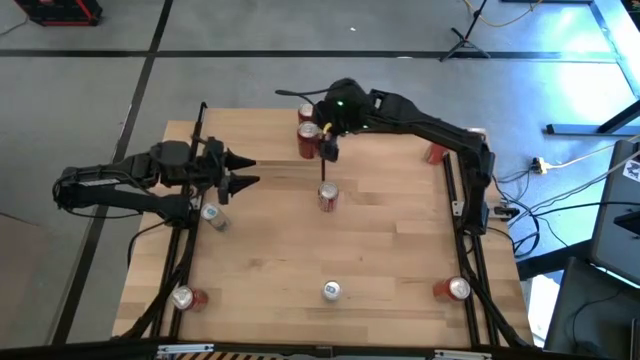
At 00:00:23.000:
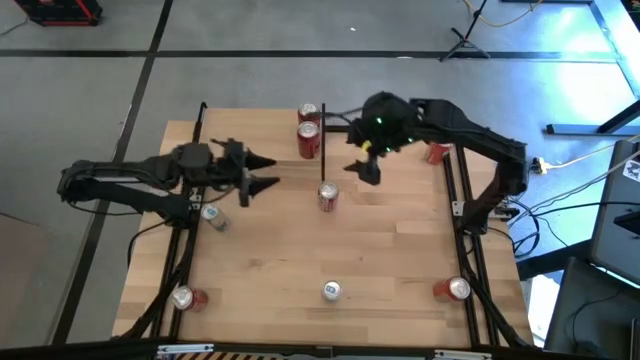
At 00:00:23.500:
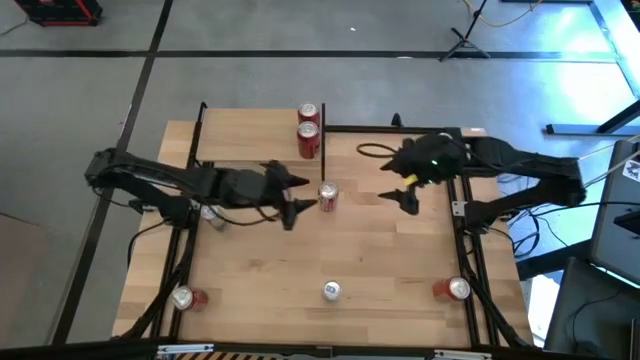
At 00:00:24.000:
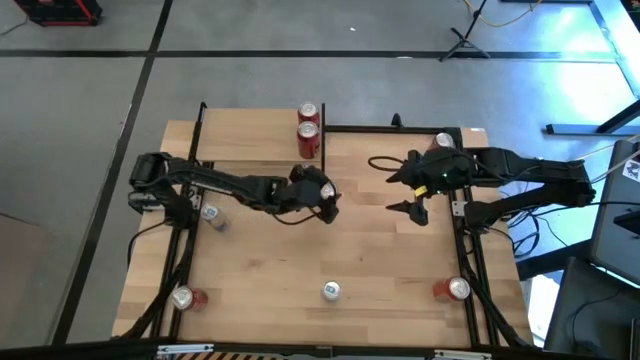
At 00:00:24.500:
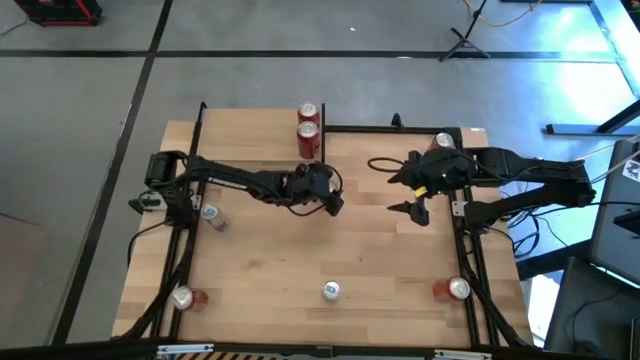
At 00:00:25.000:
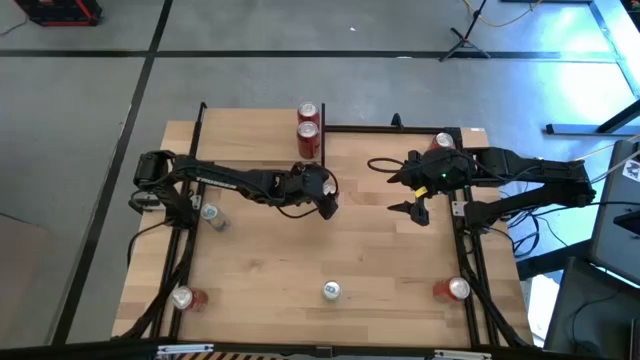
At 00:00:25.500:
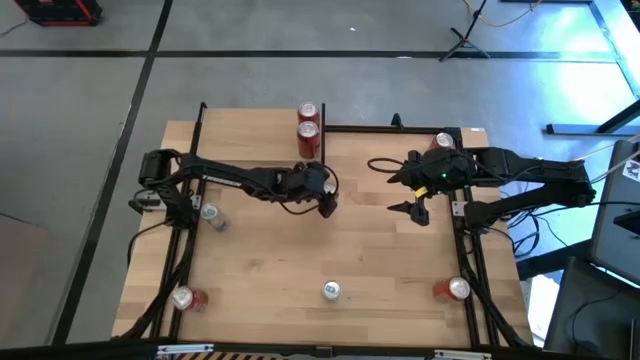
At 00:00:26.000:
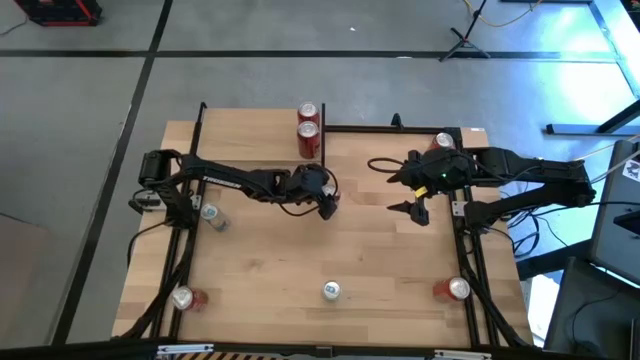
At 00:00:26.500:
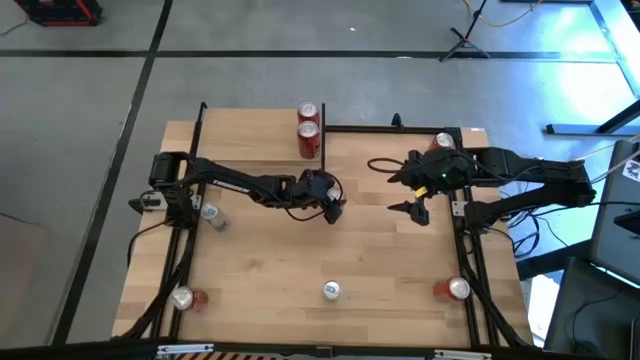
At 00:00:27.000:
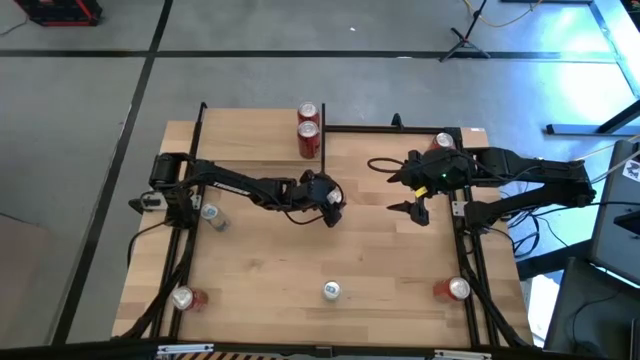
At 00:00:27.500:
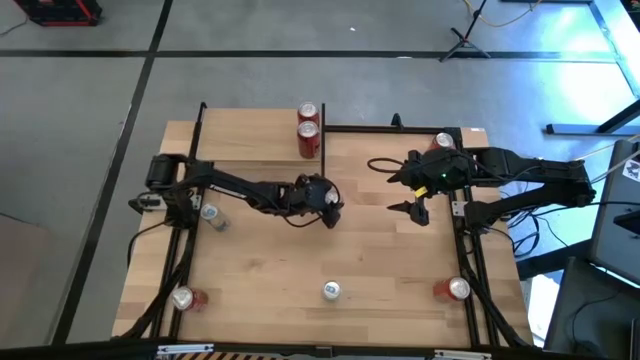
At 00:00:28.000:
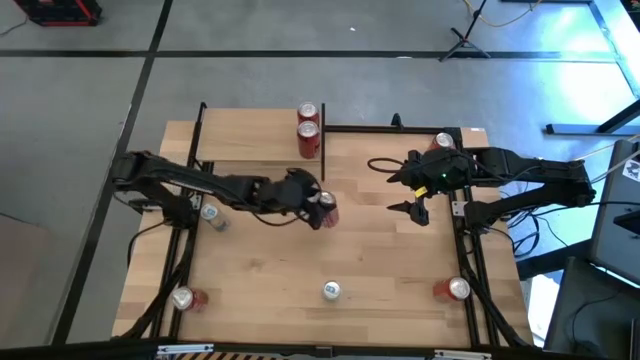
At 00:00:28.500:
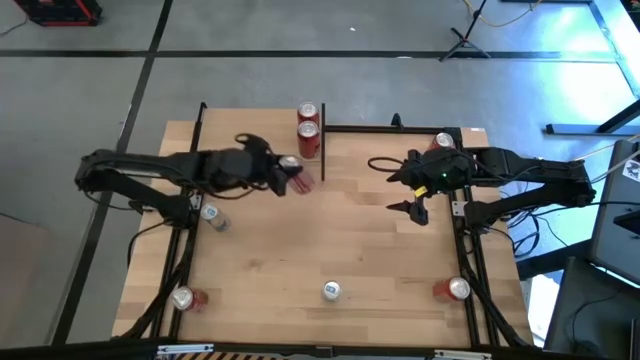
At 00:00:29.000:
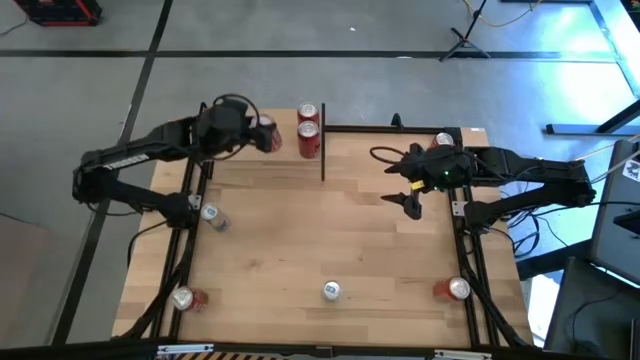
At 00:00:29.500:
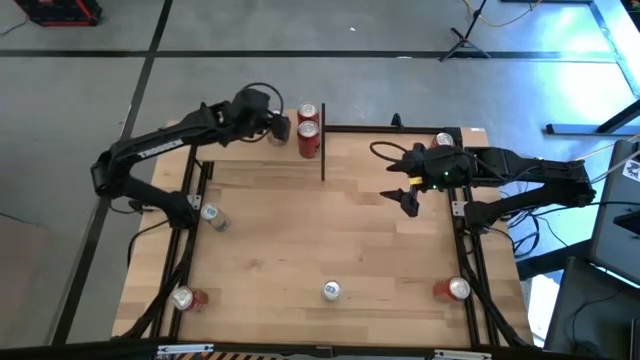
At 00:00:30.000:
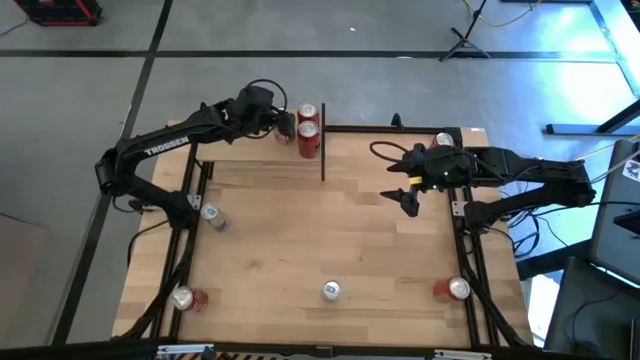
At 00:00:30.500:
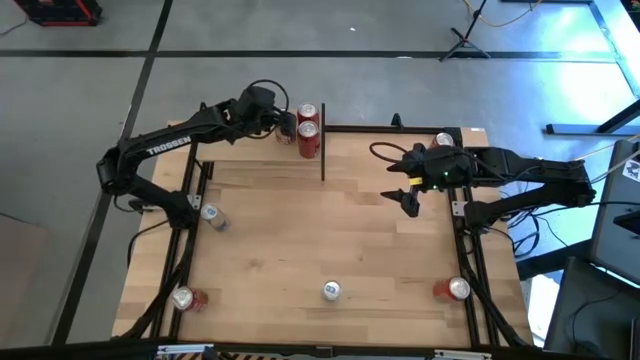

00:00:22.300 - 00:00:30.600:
Task: Place canned beverage on shelf
Put the top red white soda can on the shelf

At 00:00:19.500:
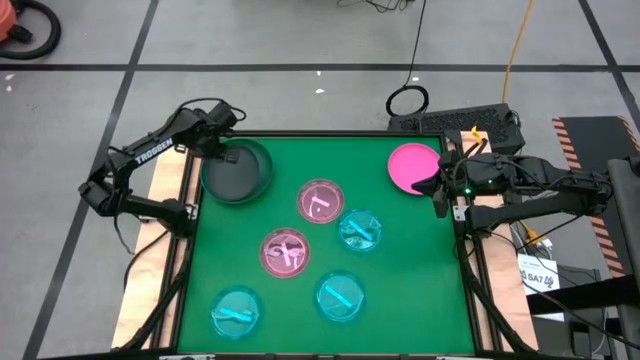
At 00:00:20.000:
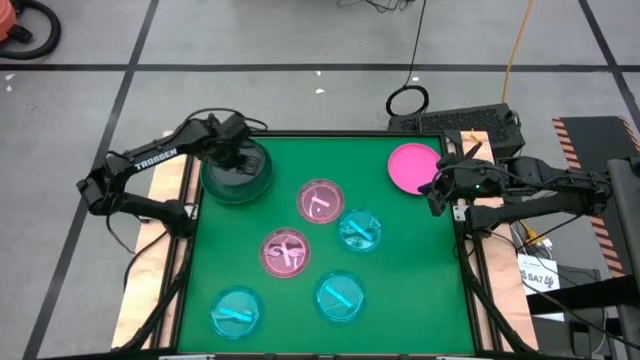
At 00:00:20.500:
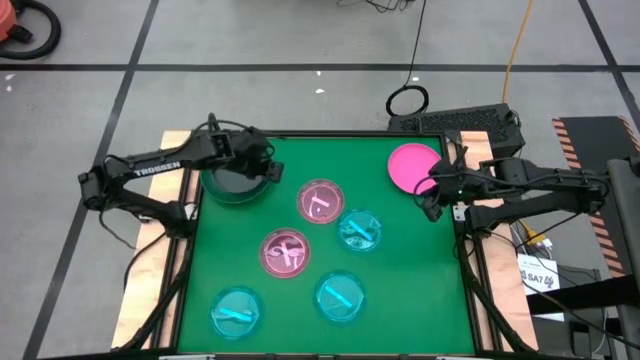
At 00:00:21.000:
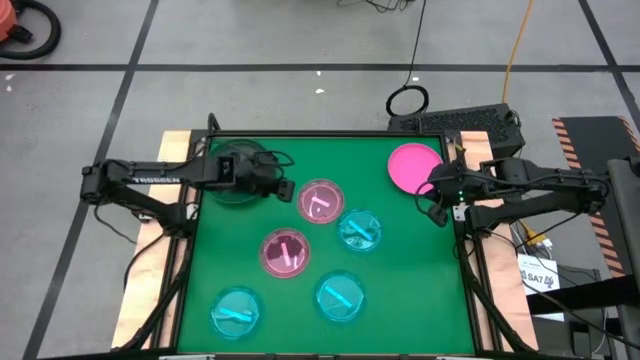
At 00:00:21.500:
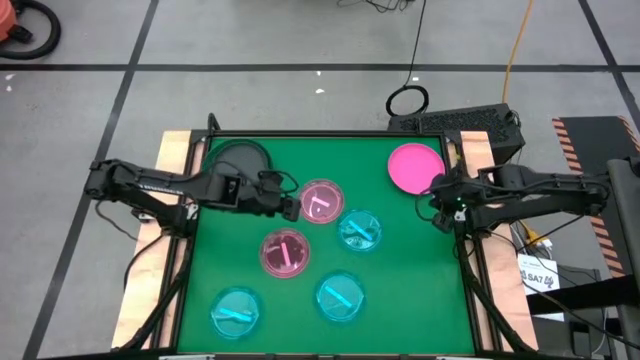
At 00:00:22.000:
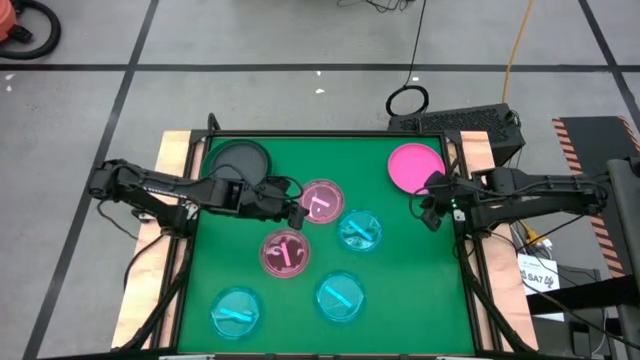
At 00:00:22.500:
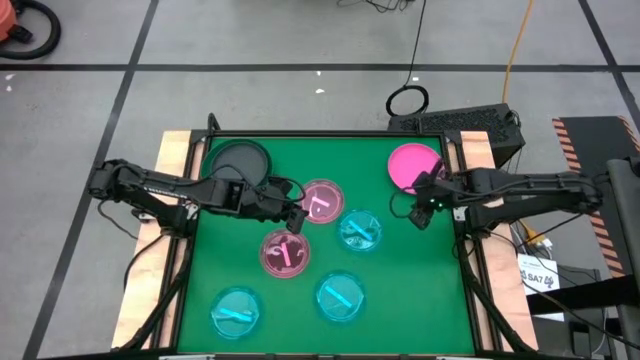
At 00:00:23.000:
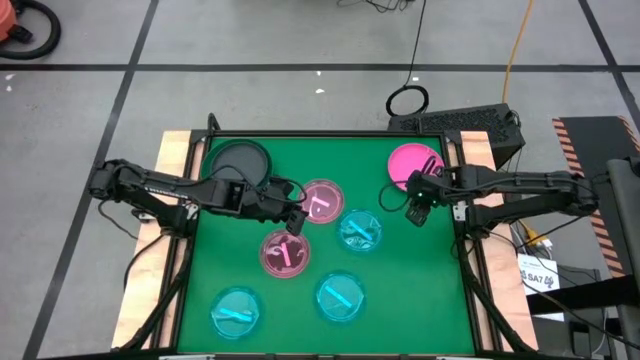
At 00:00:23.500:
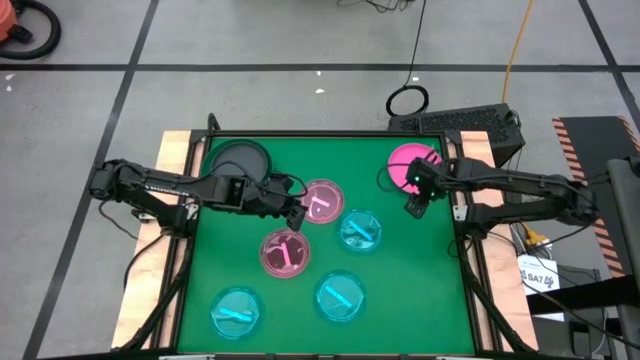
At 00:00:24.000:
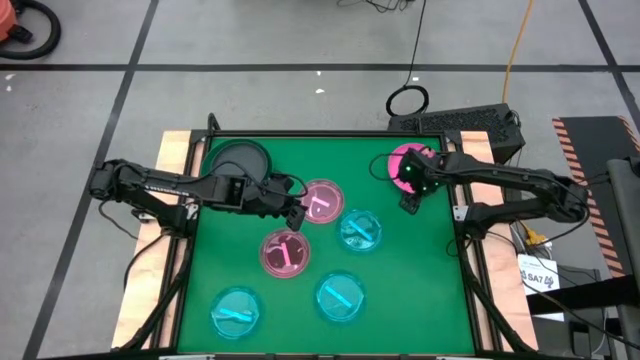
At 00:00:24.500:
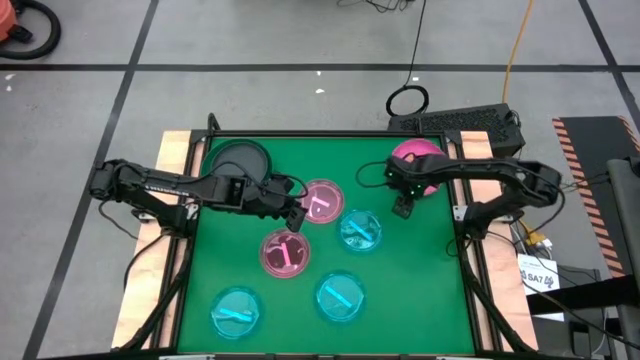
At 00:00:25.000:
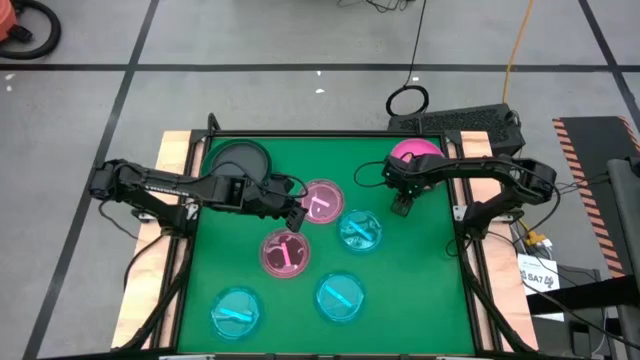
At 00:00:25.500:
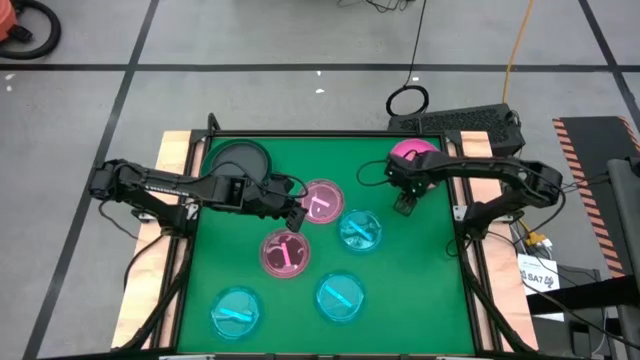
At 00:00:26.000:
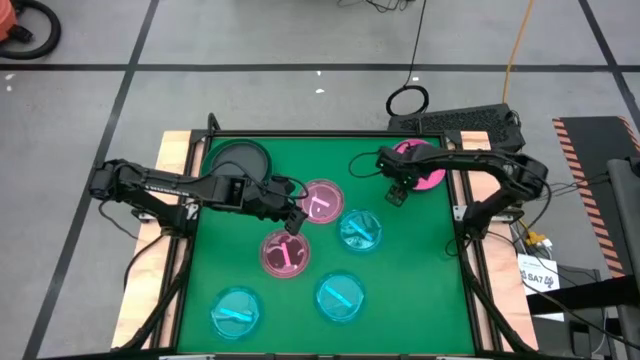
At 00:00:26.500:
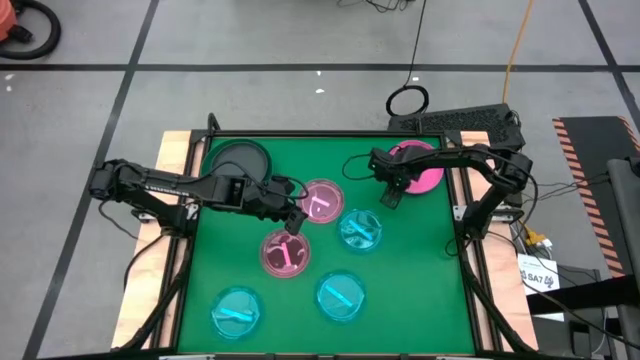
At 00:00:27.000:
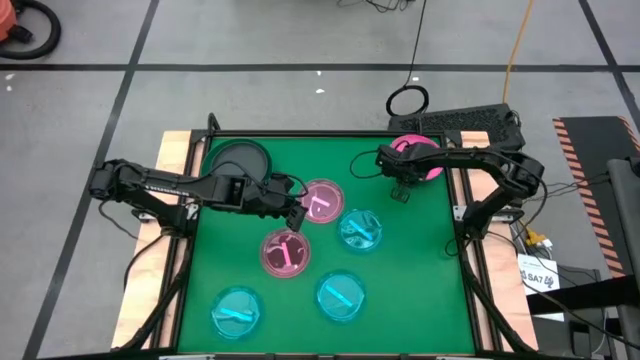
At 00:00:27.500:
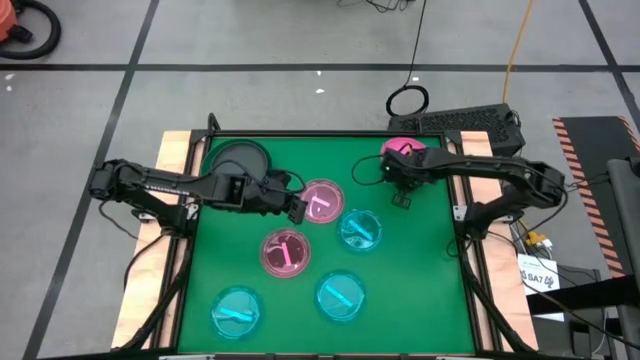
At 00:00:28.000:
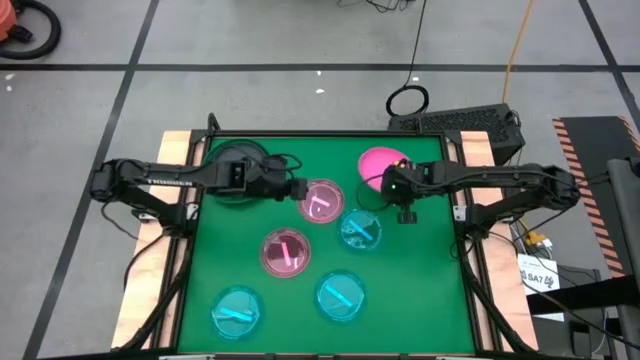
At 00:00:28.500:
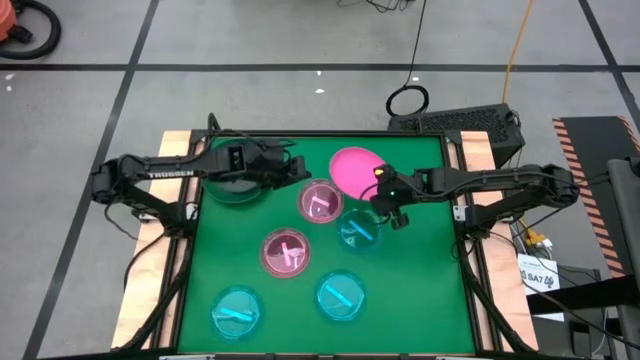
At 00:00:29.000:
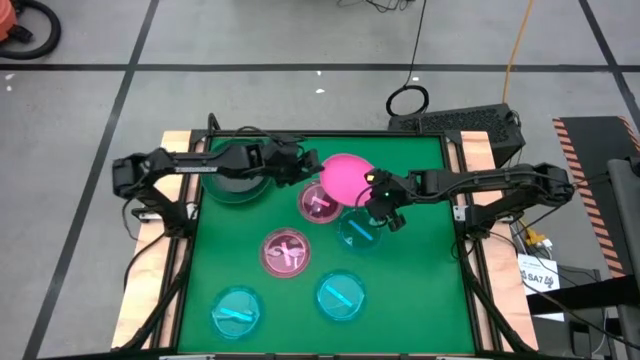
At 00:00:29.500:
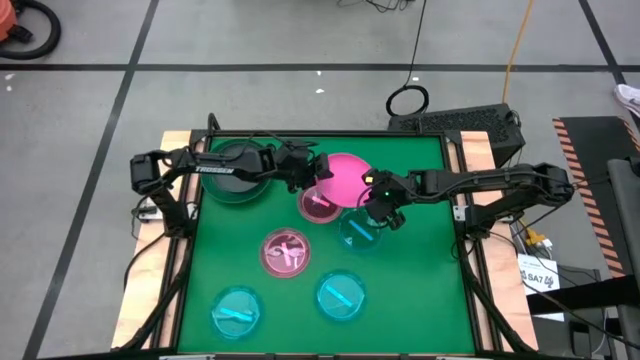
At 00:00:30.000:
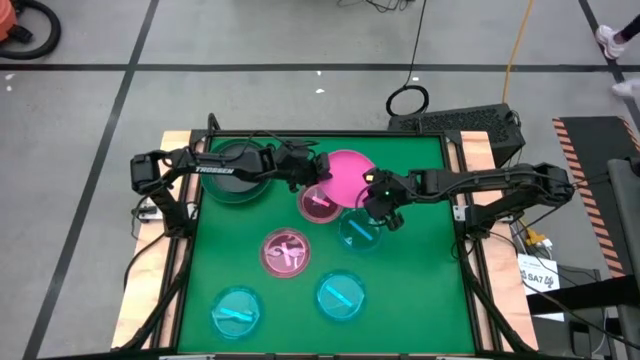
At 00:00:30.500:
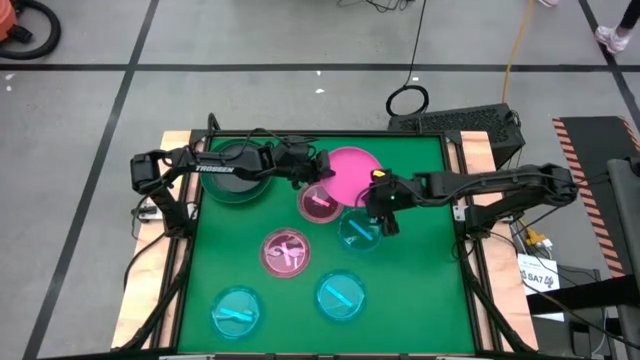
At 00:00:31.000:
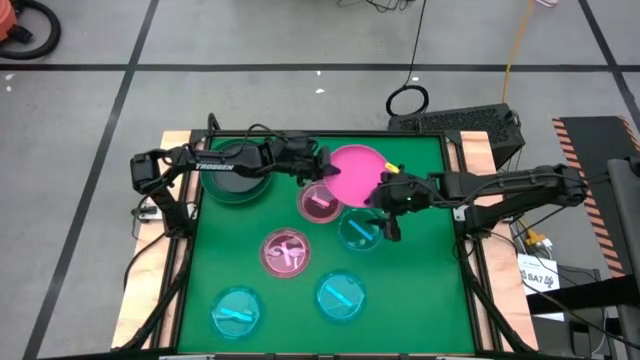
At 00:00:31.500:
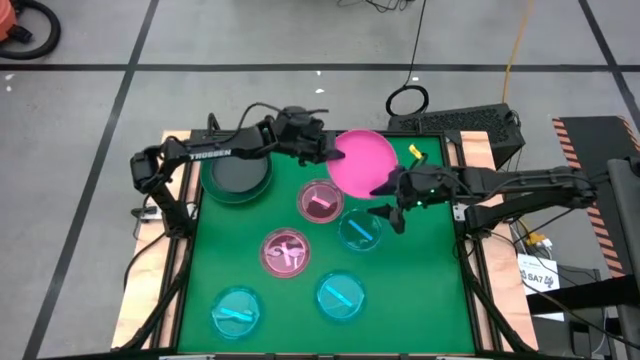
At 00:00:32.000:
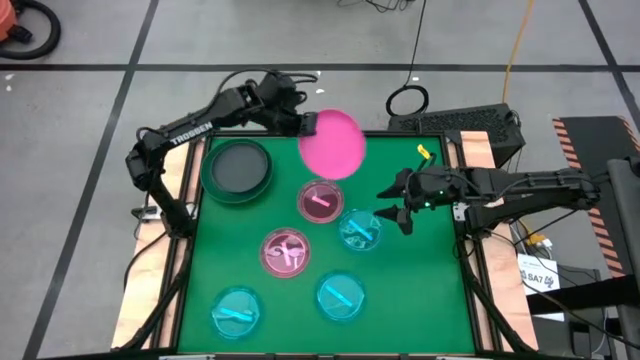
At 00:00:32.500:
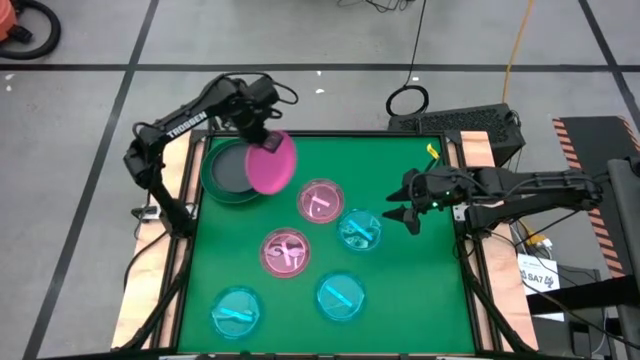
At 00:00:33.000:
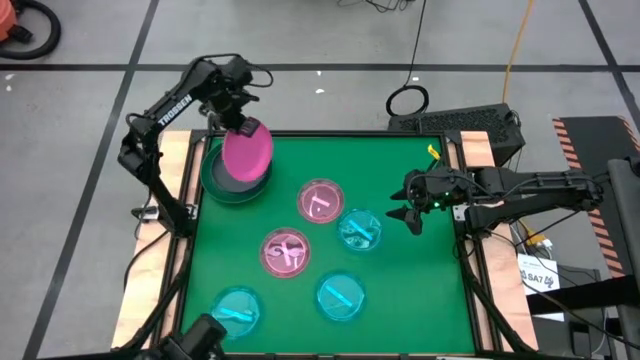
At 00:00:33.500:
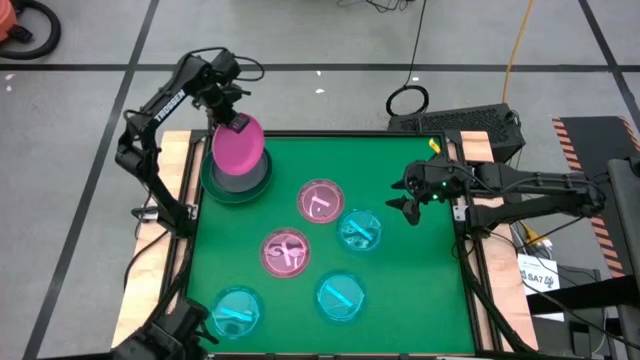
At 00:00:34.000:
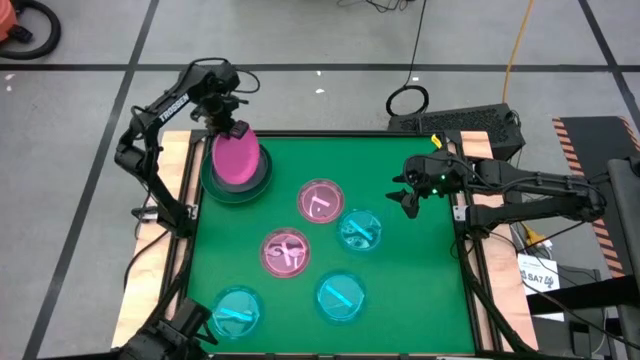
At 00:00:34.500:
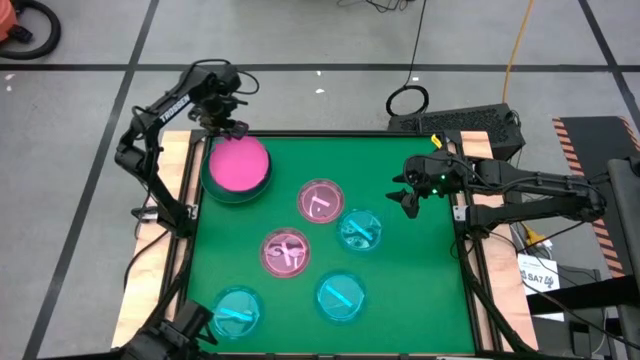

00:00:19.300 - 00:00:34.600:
Task: Stack plastic plates
Stack the pink plate on top of the black plate
